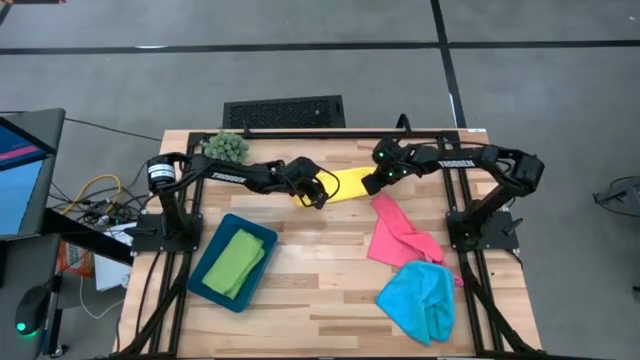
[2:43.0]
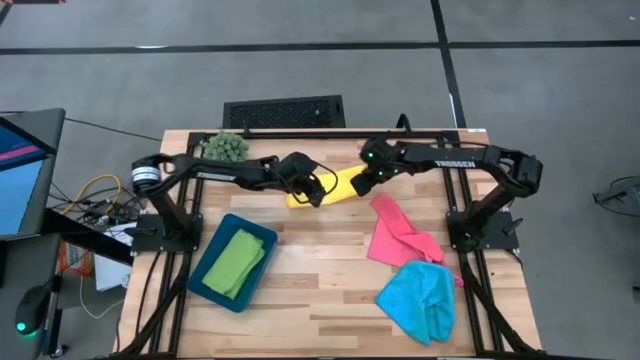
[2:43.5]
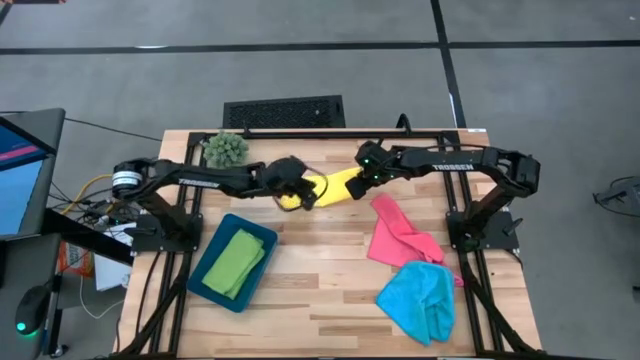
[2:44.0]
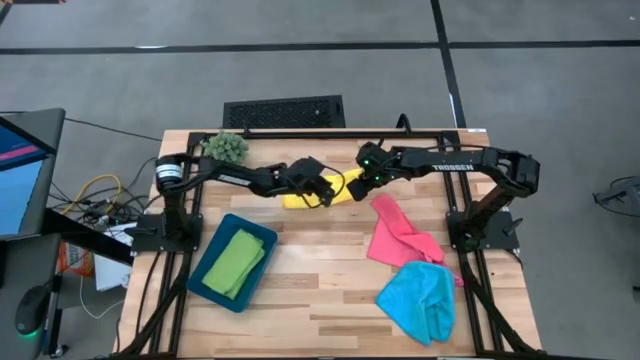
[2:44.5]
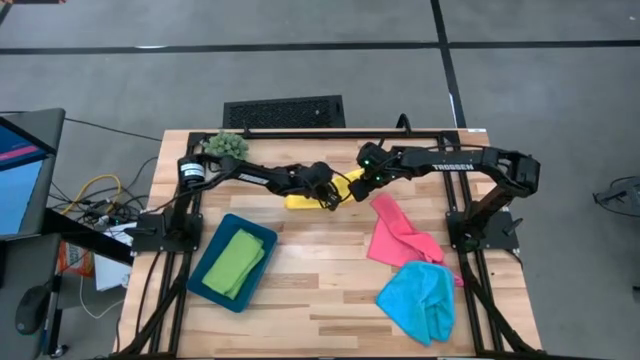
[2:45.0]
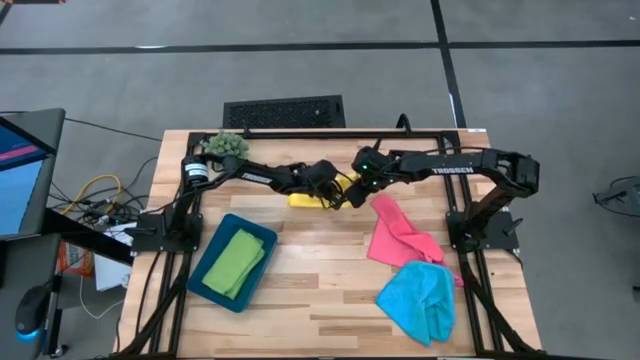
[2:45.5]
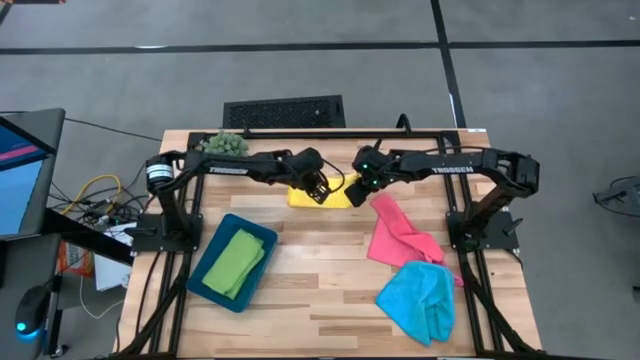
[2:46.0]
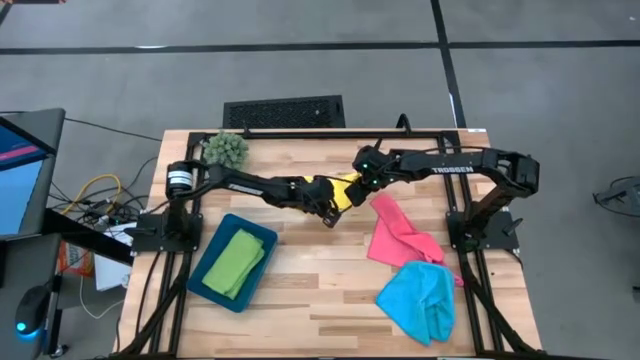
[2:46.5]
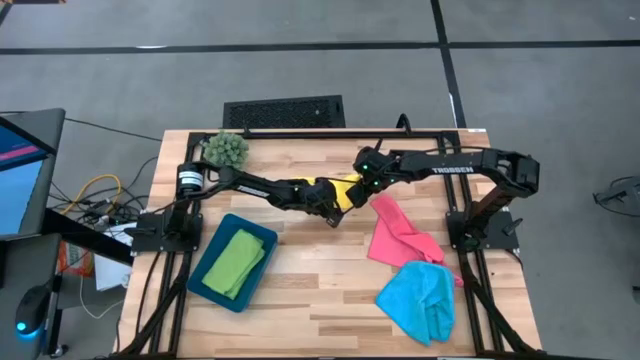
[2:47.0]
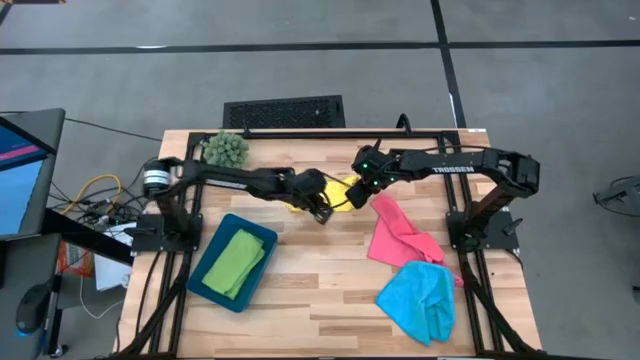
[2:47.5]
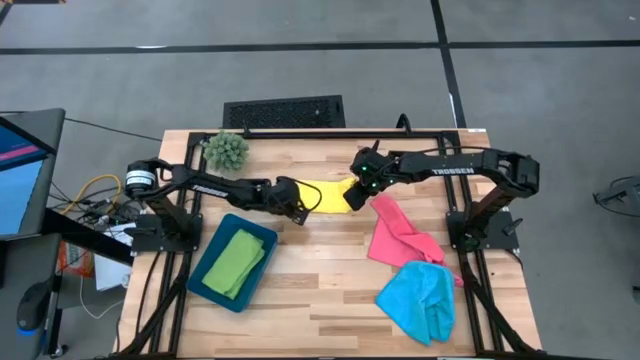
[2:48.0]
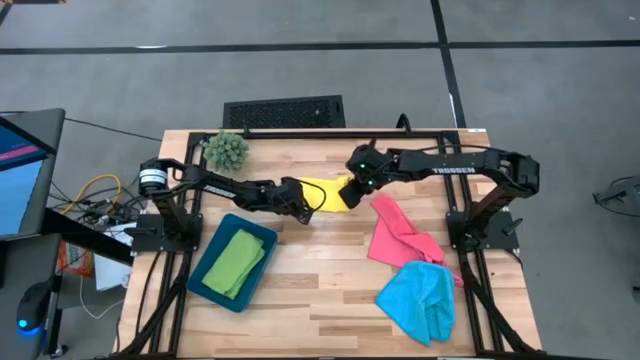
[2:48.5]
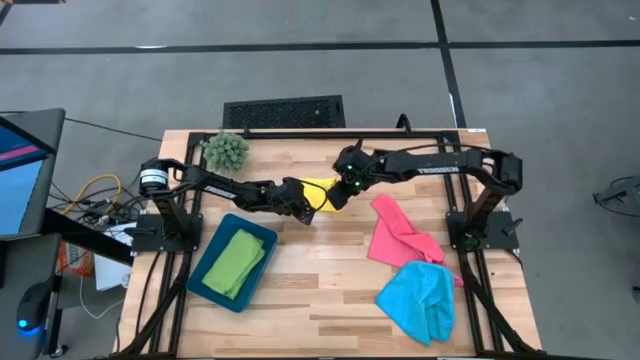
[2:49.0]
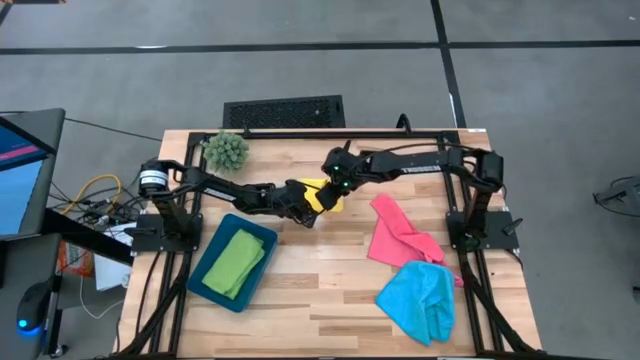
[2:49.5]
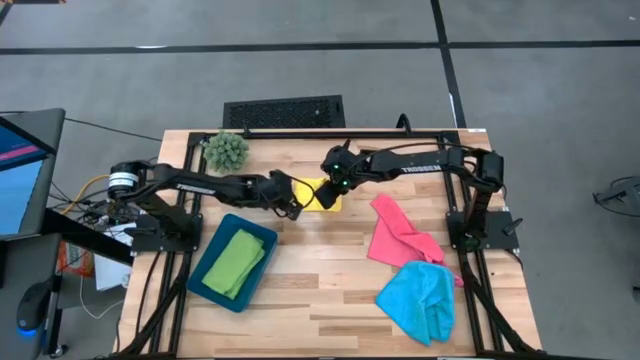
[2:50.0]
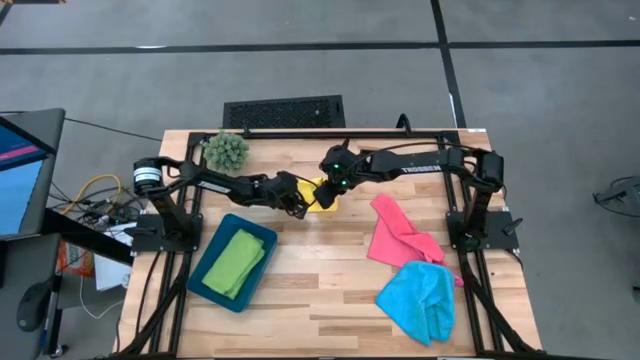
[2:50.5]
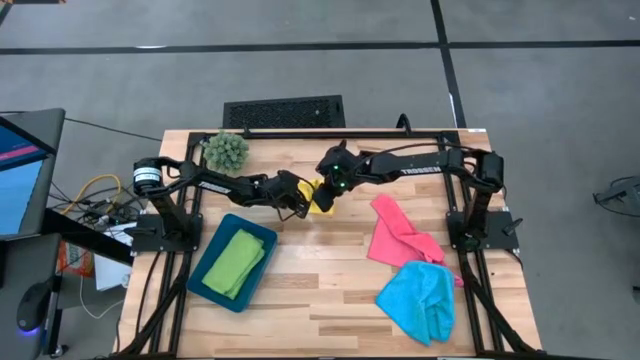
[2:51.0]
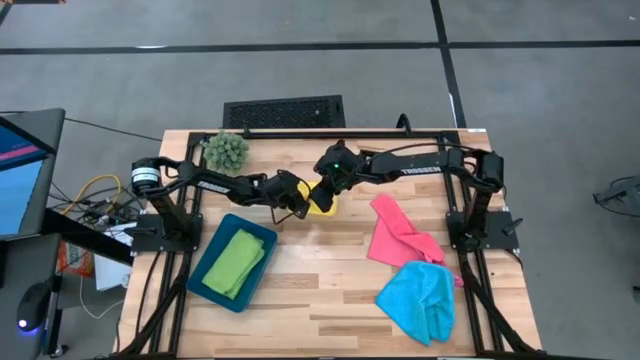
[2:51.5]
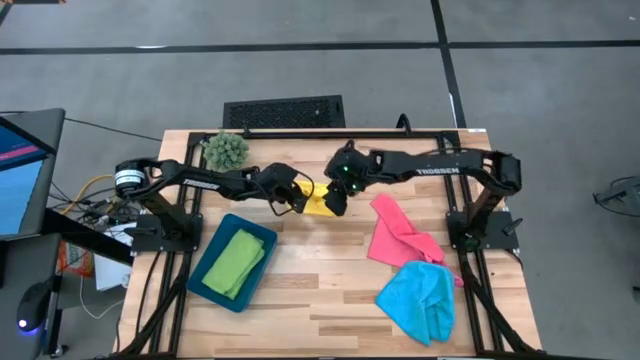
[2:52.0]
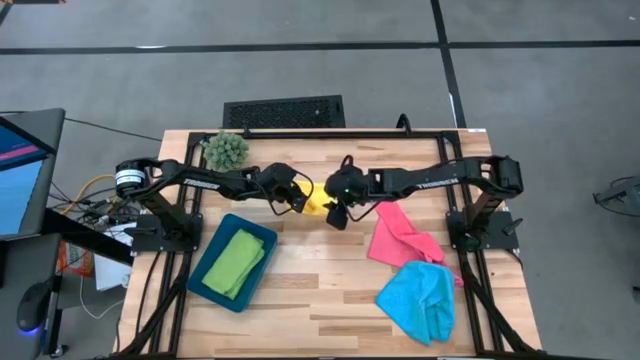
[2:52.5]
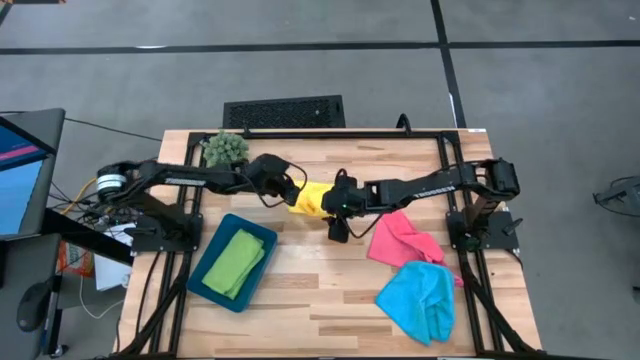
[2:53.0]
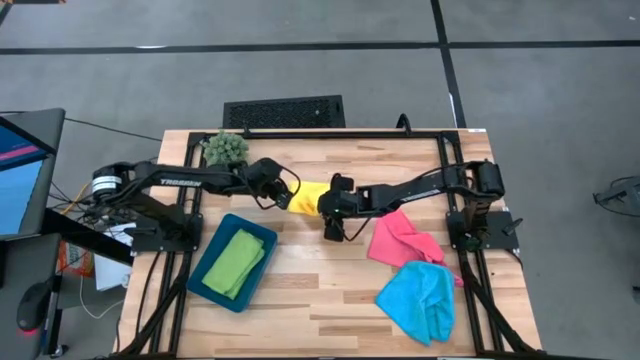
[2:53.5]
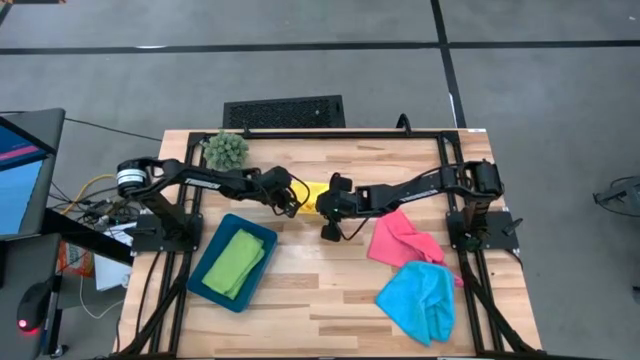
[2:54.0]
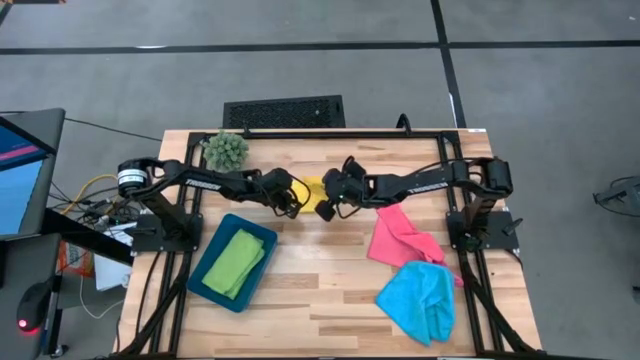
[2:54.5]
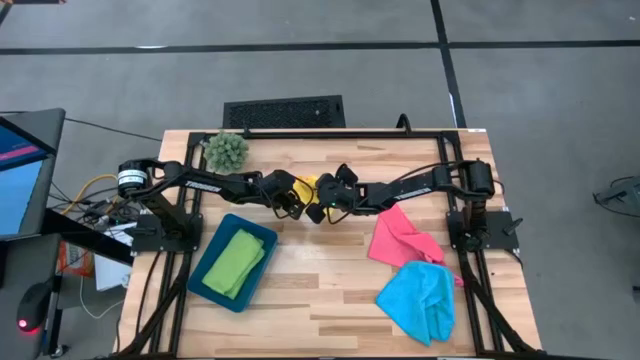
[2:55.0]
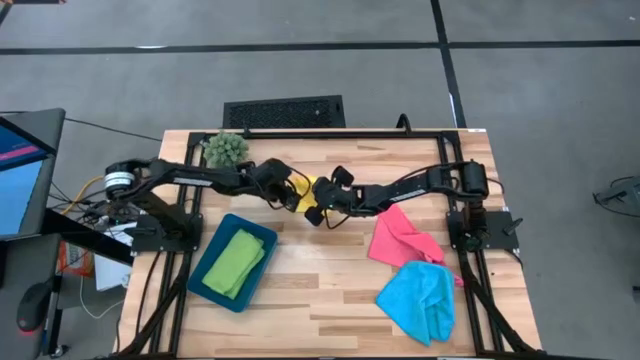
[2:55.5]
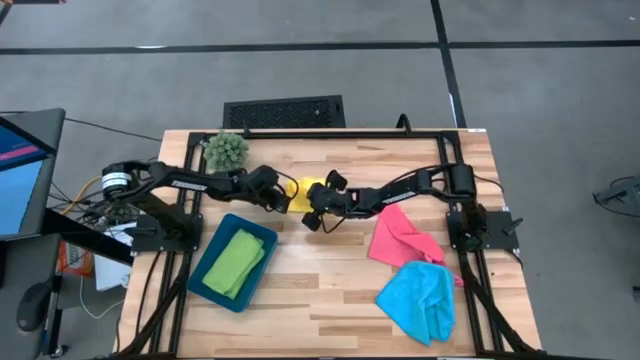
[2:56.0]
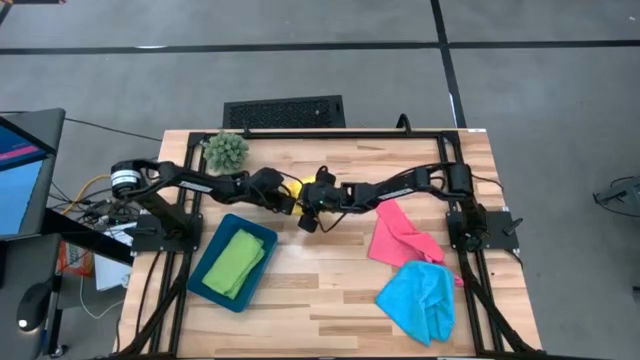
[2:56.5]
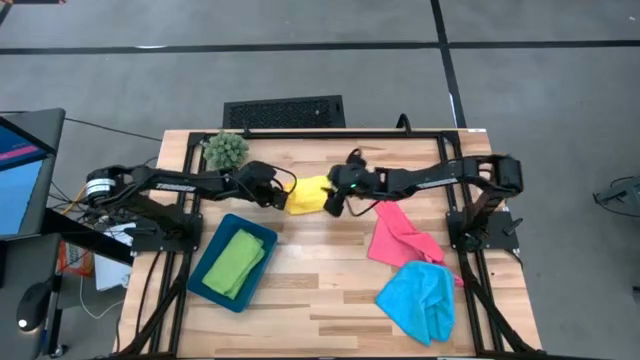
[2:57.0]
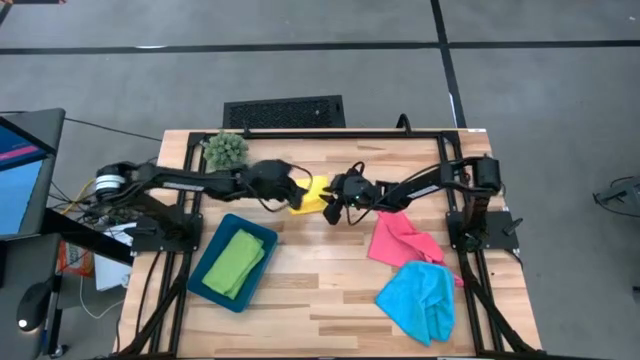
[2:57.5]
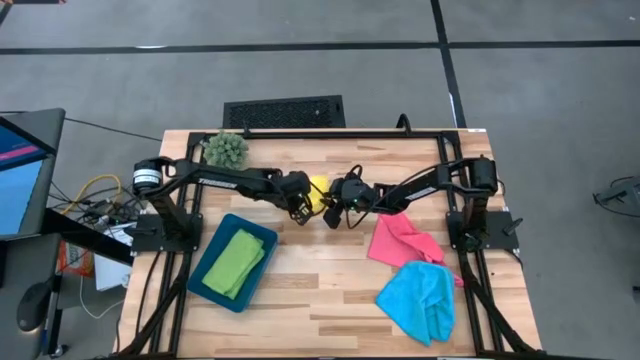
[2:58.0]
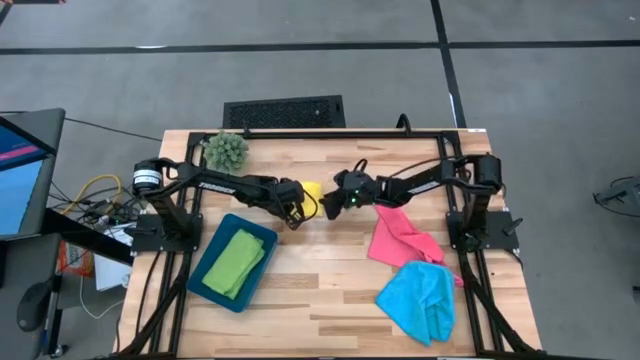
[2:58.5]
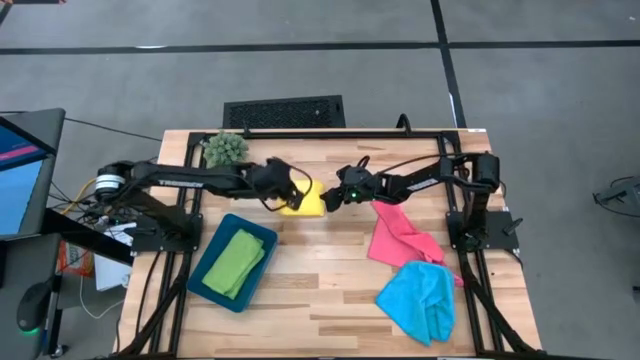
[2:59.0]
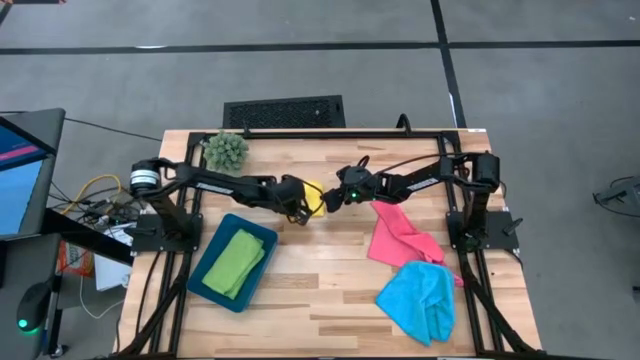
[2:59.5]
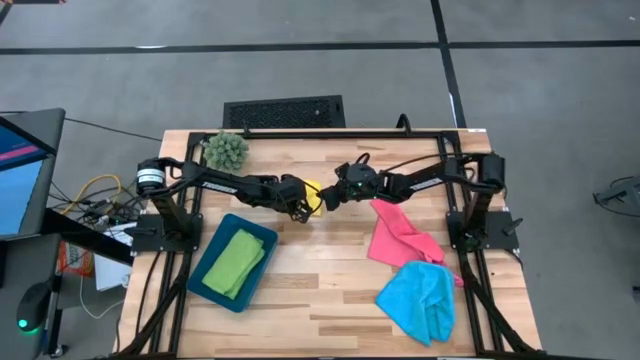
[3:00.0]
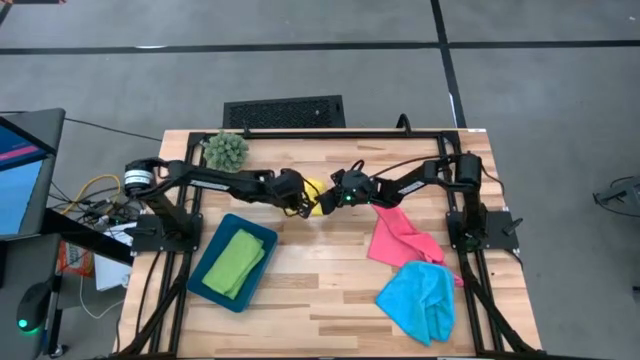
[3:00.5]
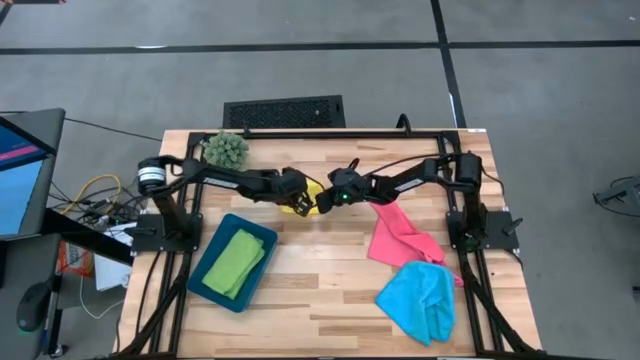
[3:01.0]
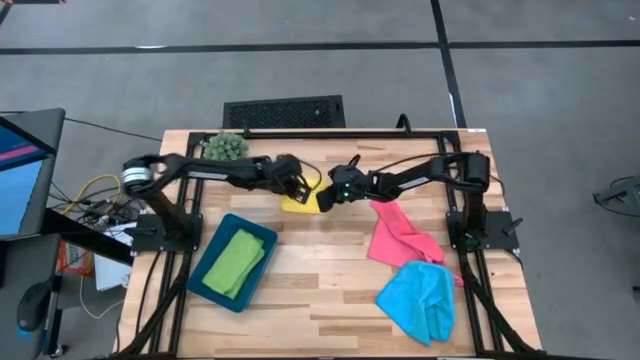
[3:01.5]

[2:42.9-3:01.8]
Task: Fold microfiber towels
Fold the yellow microfiber towel

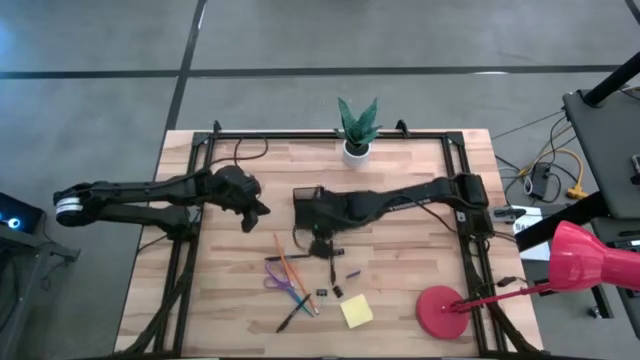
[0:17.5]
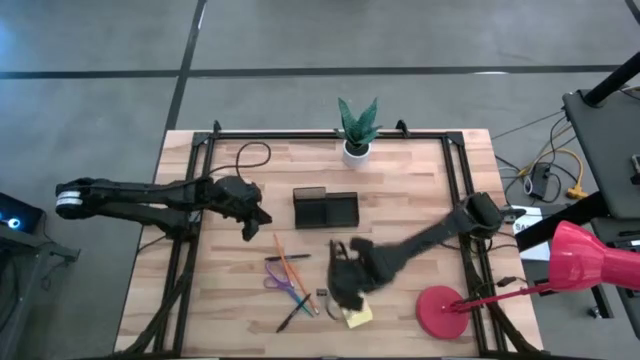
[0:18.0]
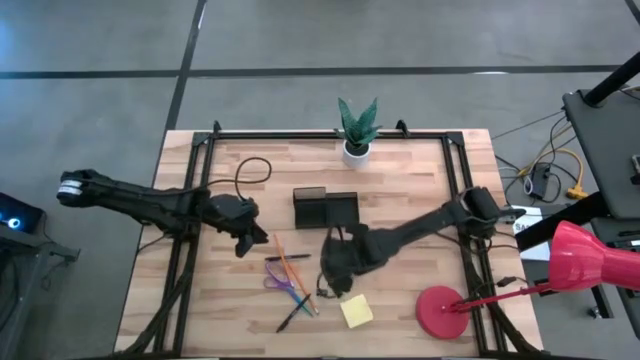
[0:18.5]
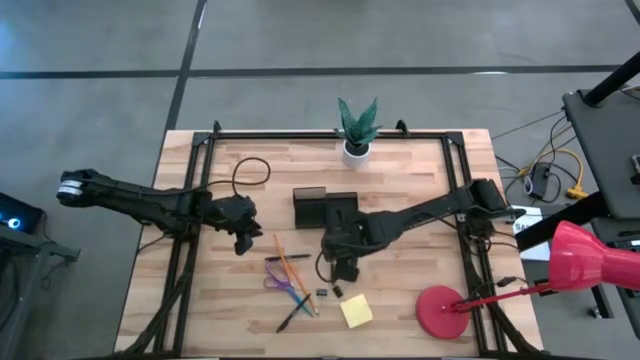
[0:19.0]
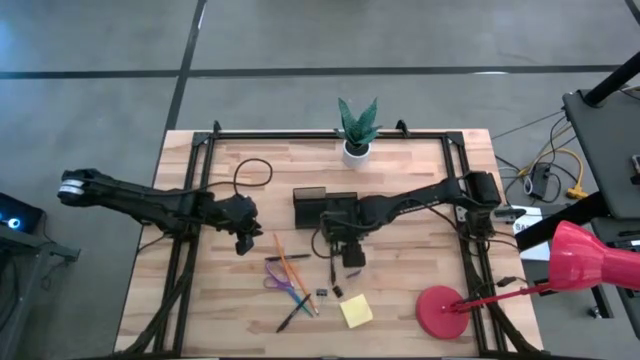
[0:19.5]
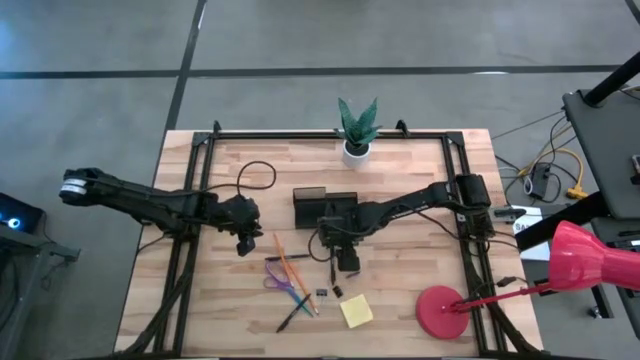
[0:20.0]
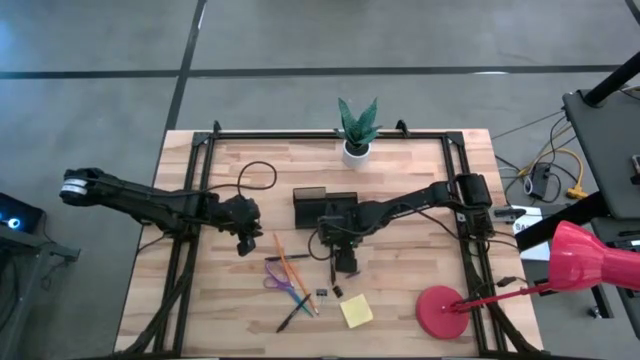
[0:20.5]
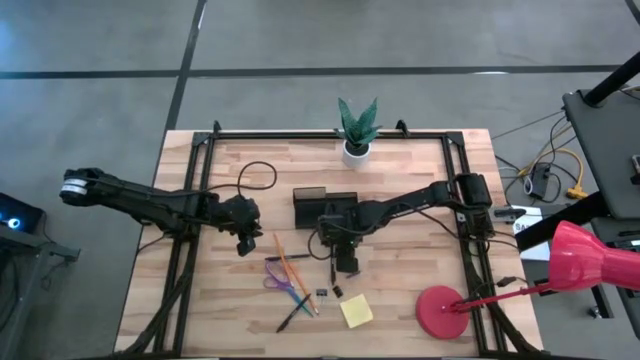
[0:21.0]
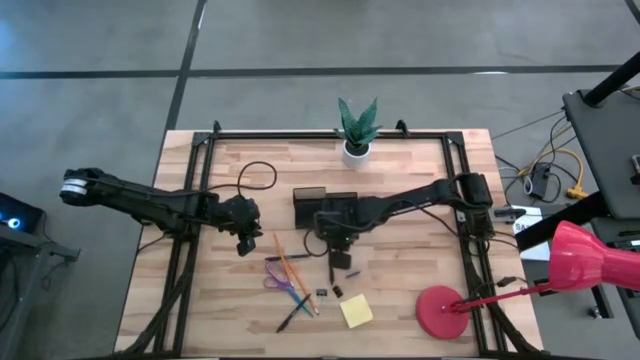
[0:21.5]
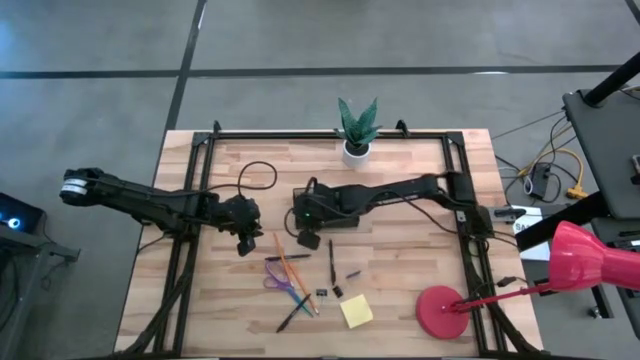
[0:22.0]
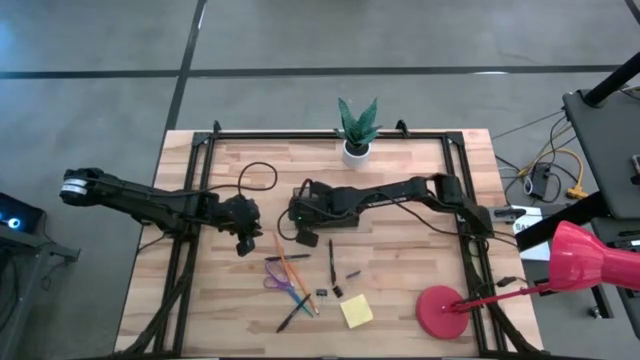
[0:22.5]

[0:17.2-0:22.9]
Task: Pick and place office supplies into organizer
Put the top binder clip into the desk organizer
